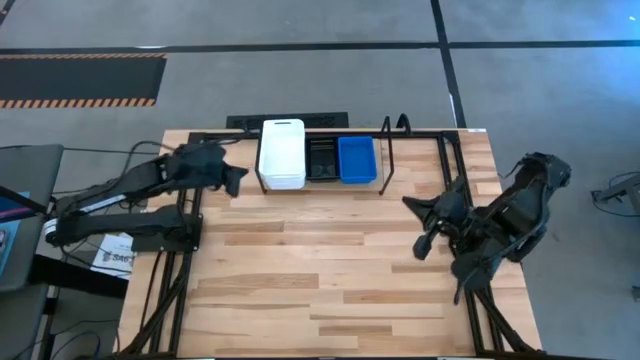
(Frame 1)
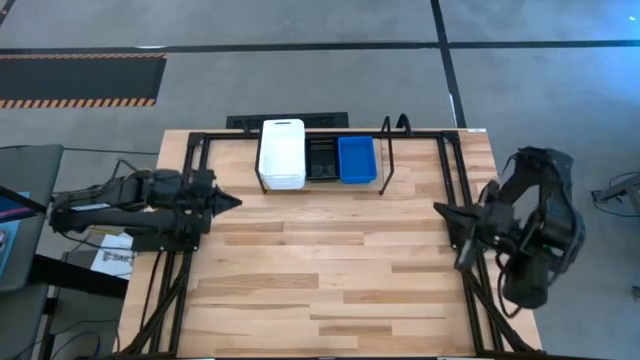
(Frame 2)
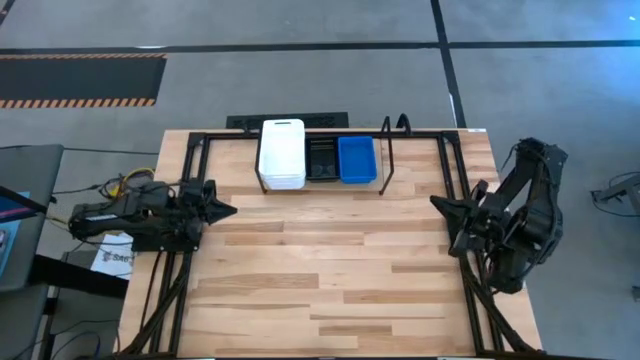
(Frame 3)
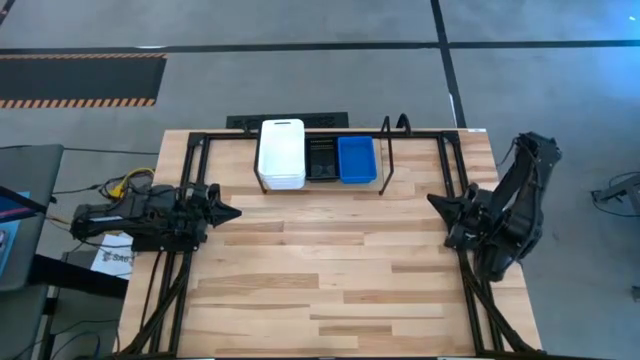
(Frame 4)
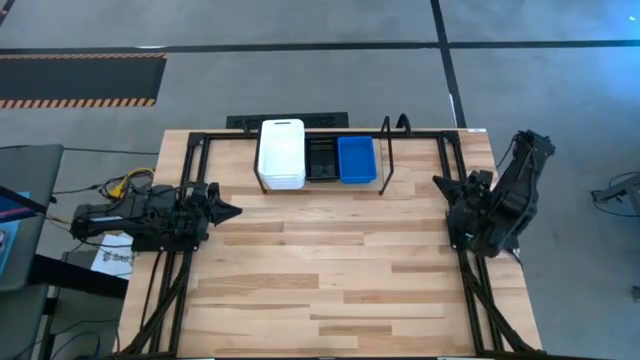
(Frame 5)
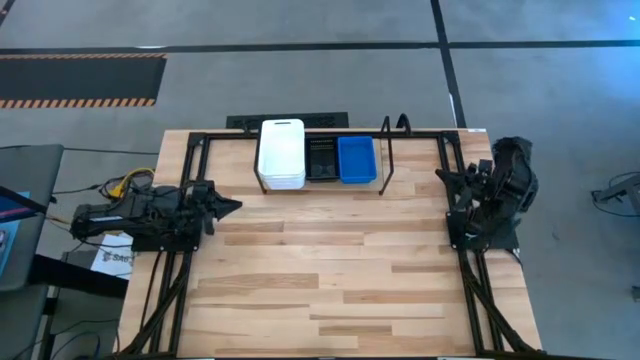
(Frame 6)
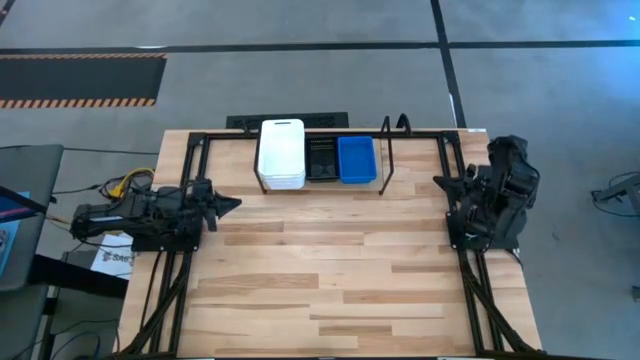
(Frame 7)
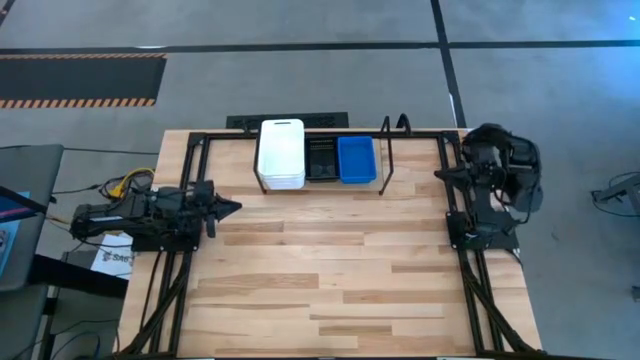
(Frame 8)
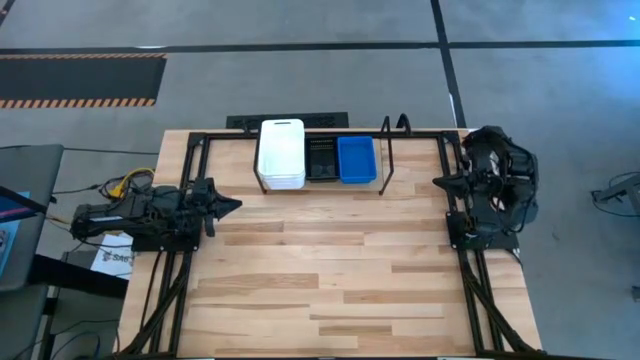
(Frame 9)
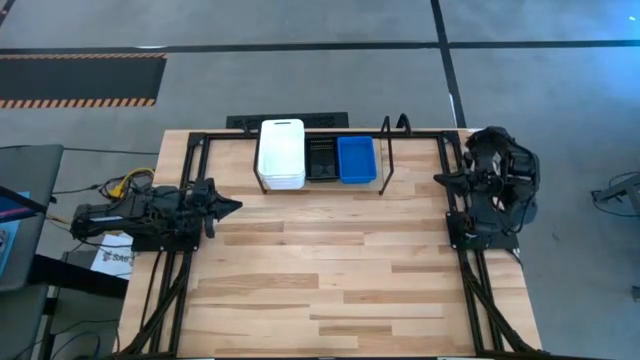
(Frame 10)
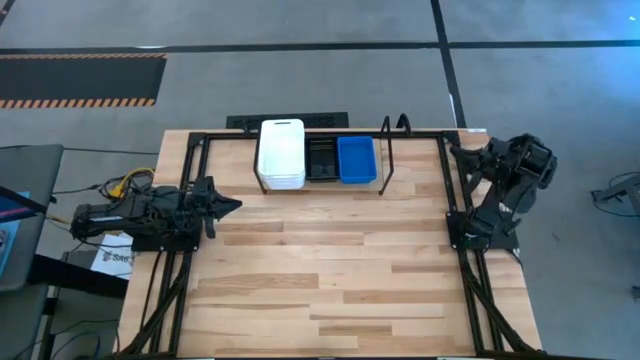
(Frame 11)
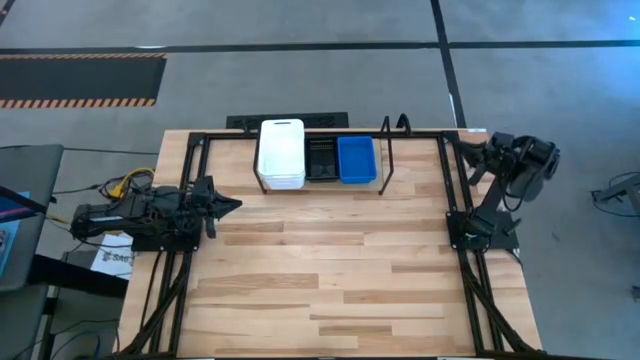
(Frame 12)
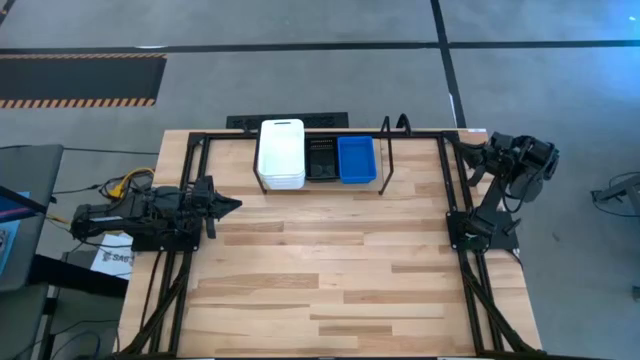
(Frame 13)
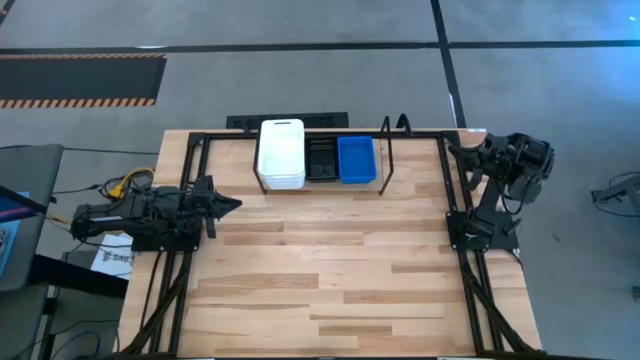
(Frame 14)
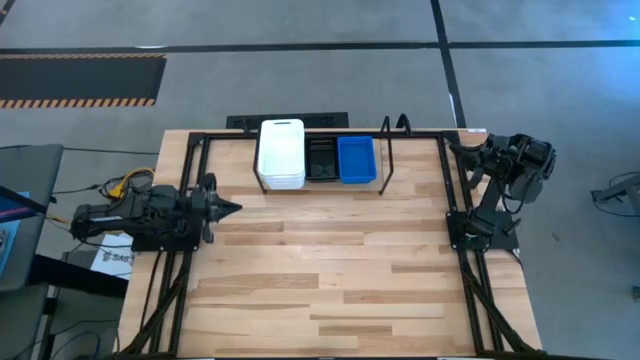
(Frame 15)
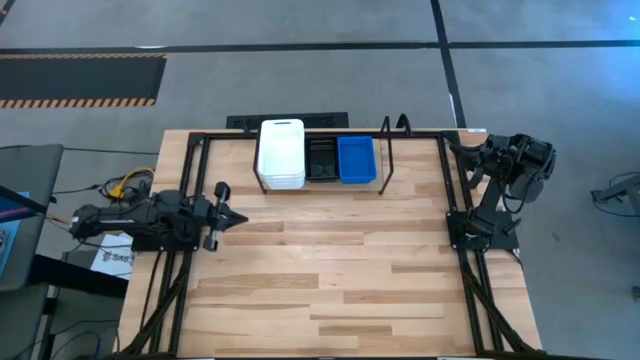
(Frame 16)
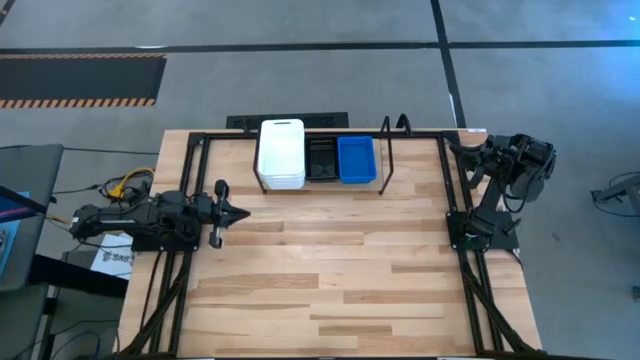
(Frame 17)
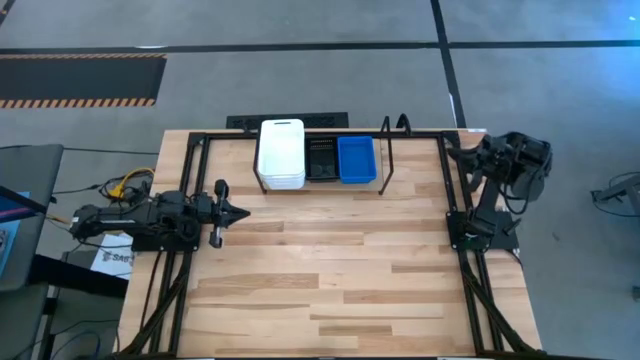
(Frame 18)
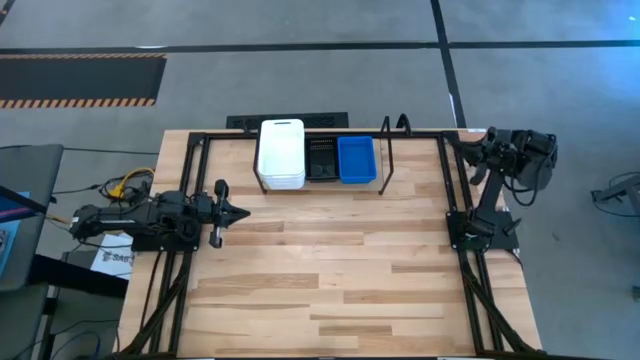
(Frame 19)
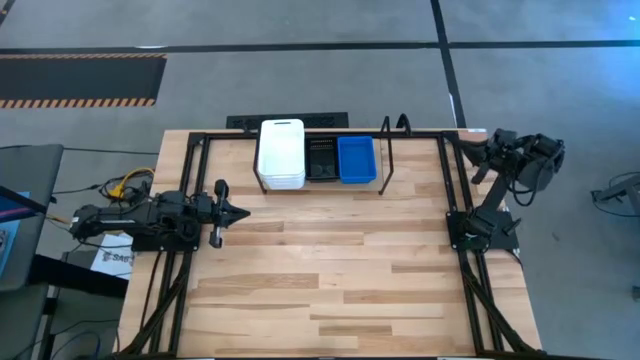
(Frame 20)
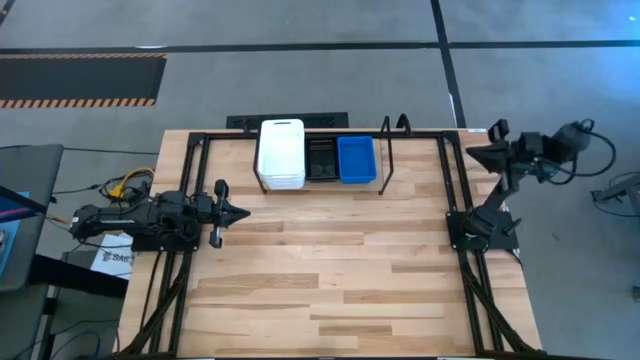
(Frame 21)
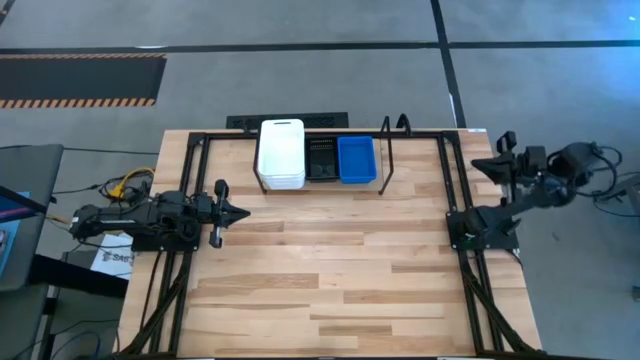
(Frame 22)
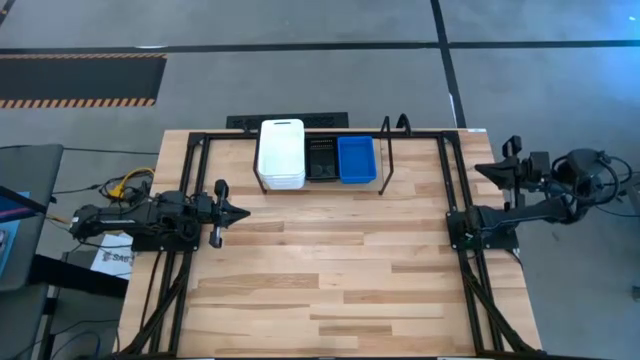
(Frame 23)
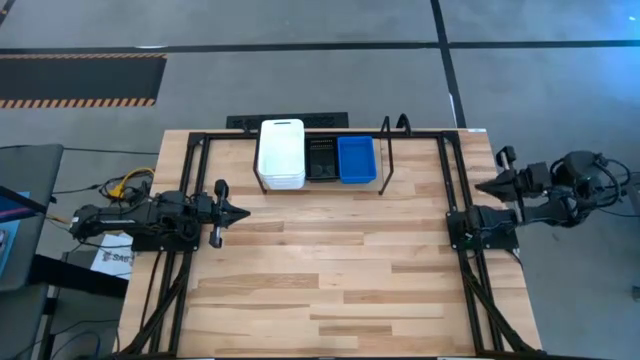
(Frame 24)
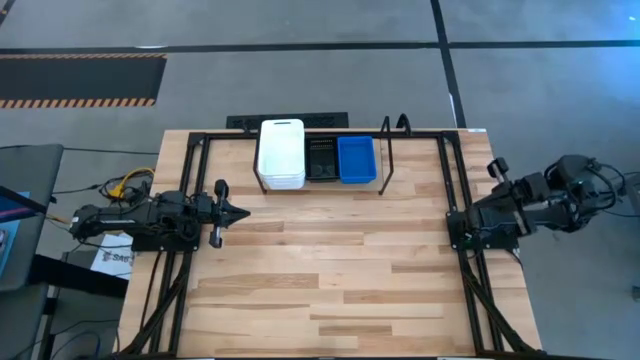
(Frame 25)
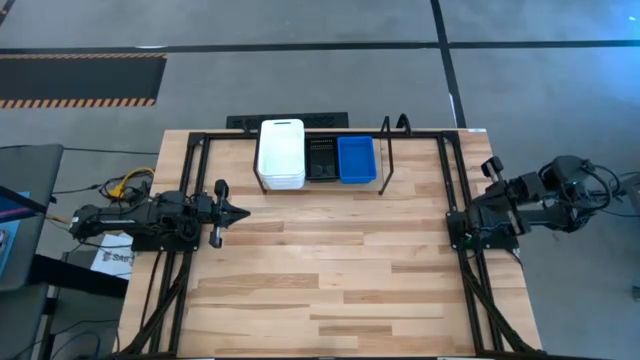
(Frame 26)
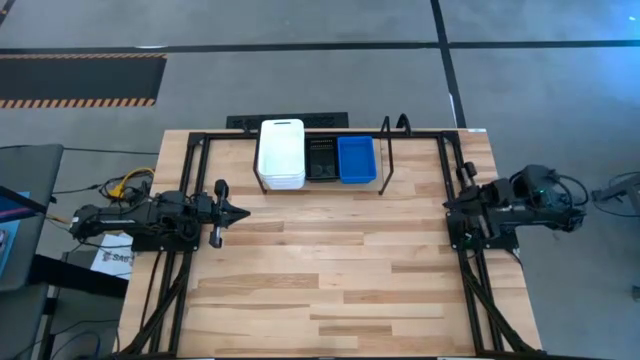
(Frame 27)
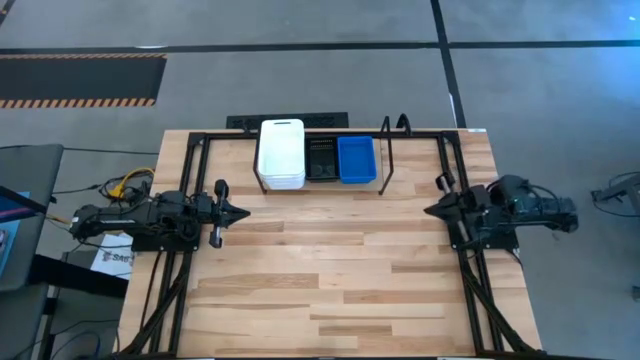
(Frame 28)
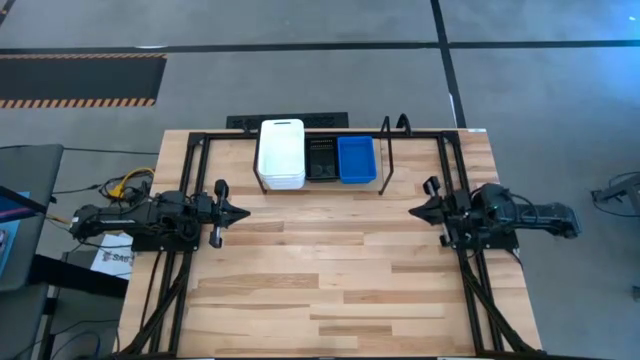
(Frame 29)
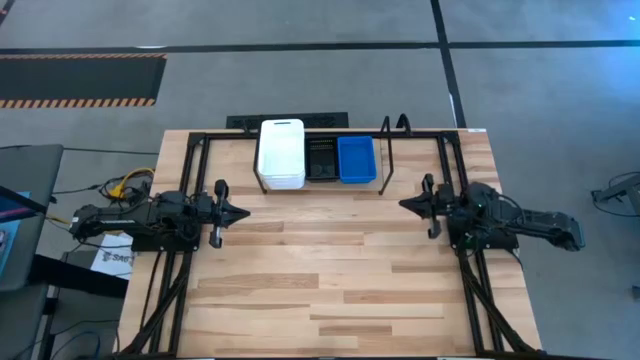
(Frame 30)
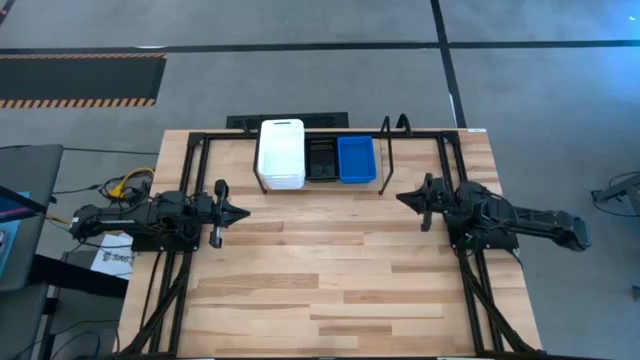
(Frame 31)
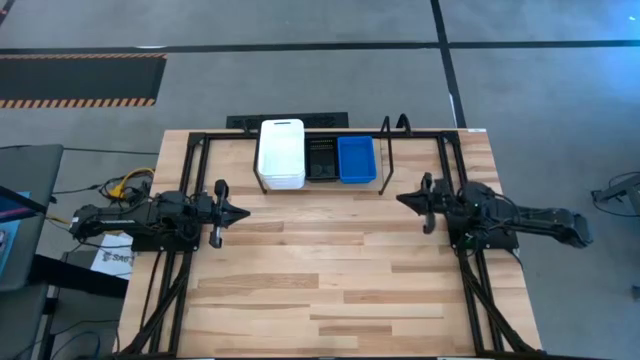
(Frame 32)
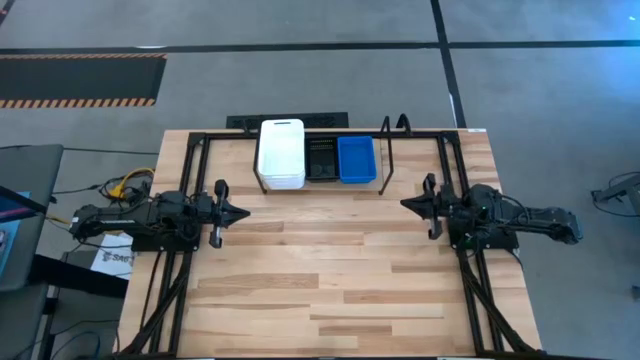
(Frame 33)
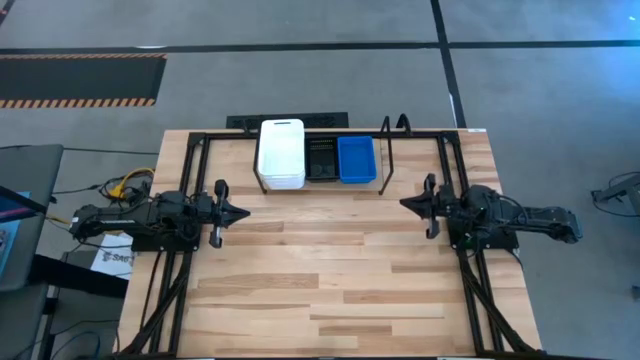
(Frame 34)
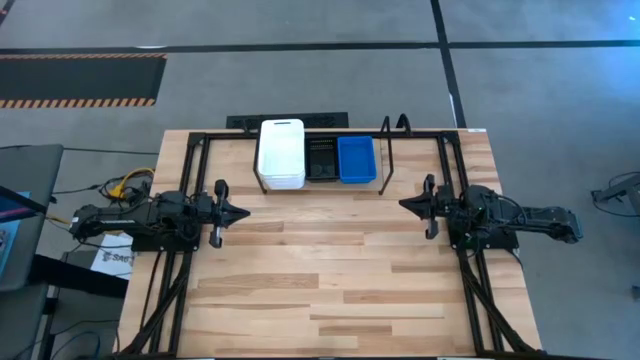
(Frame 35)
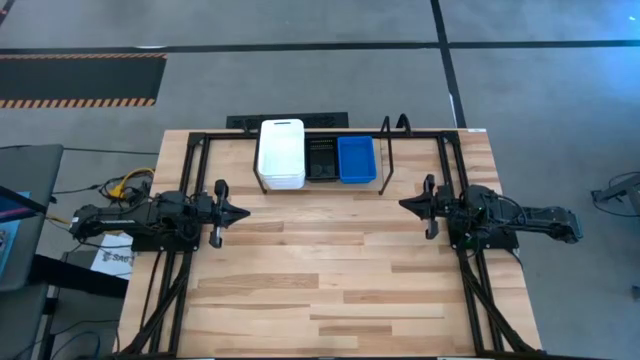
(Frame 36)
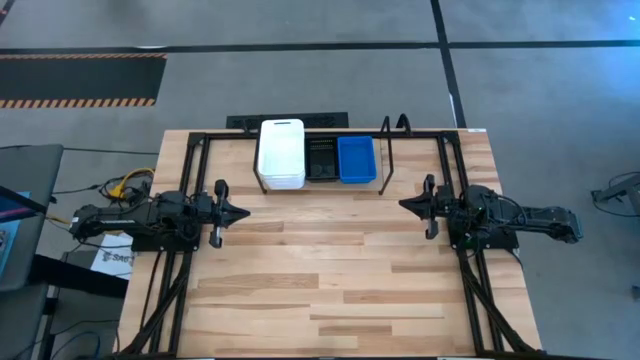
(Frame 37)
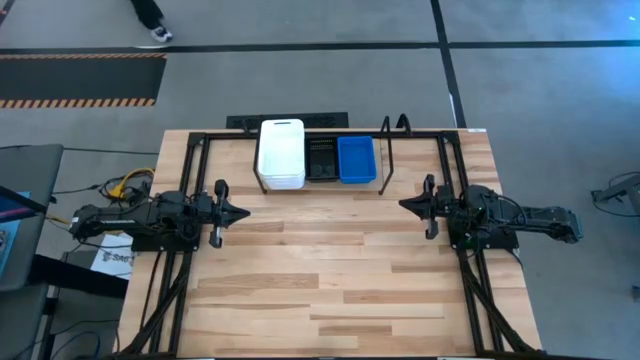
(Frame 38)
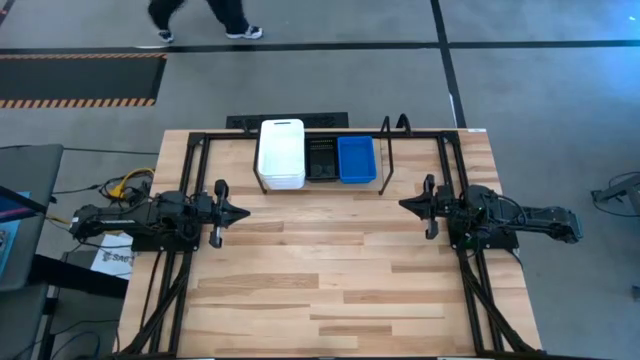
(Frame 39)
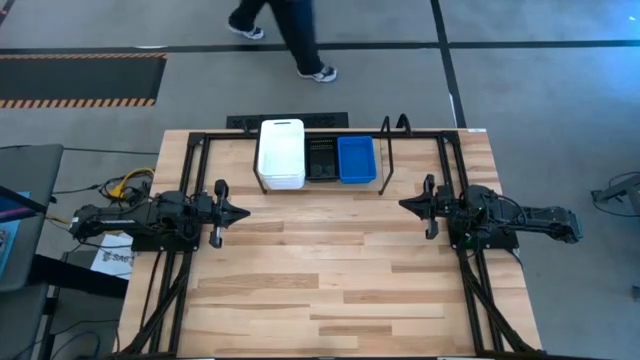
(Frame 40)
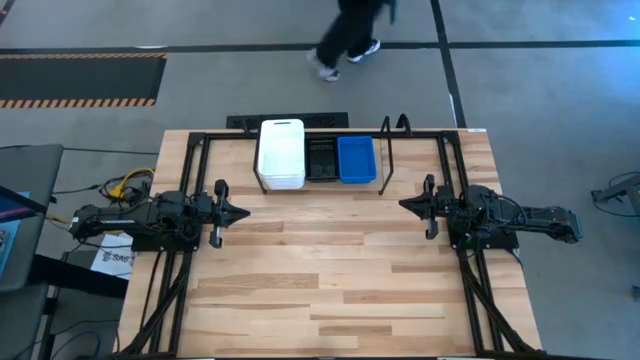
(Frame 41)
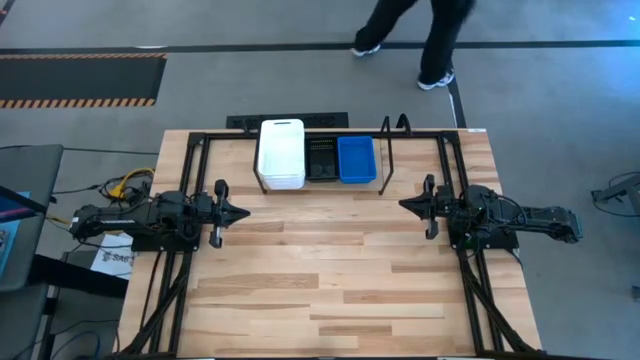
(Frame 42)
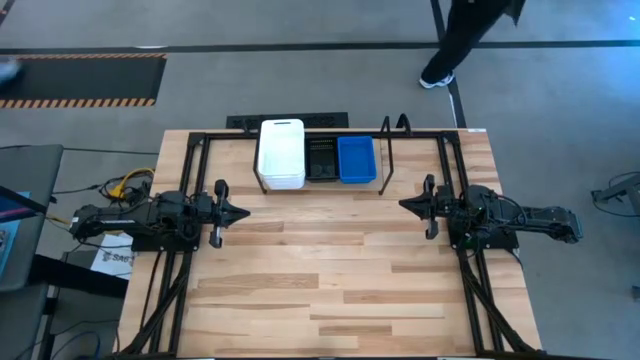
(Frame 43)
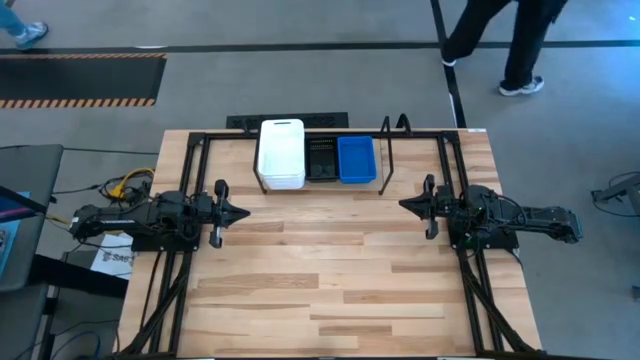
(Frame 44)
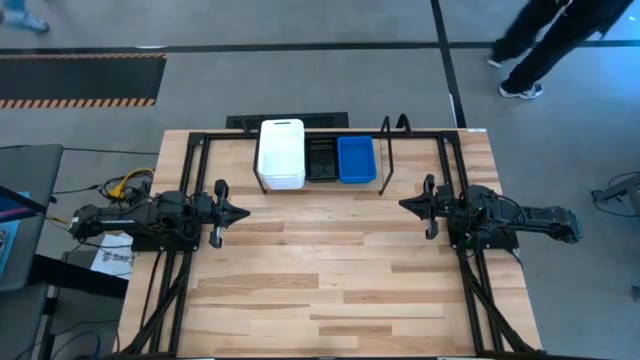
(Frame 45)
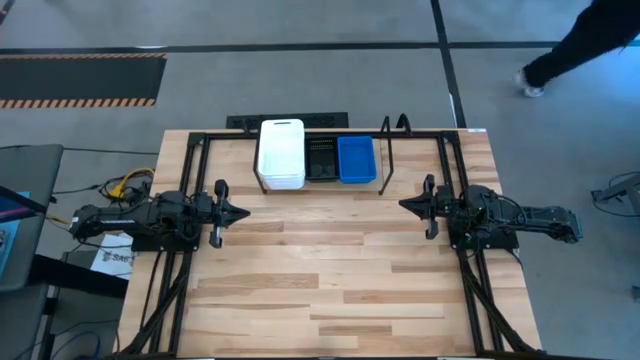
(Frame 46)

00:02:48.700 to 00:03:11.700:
Task: Stack baskets on shelf by color
Return to Home Position
